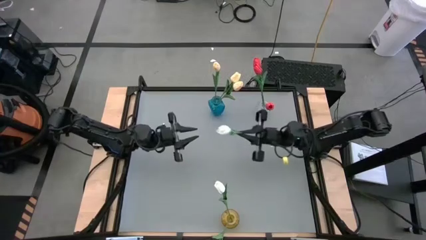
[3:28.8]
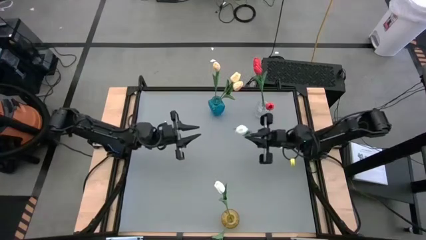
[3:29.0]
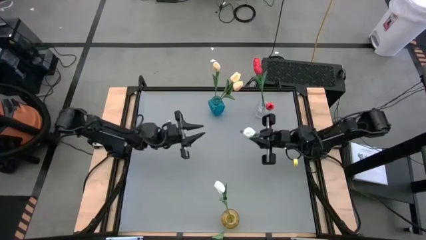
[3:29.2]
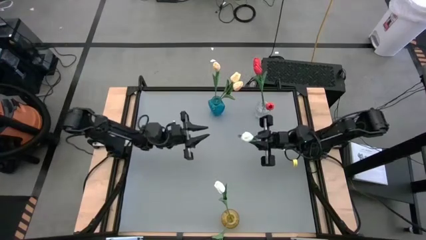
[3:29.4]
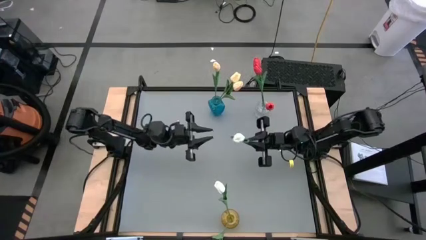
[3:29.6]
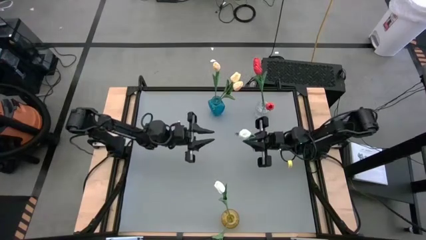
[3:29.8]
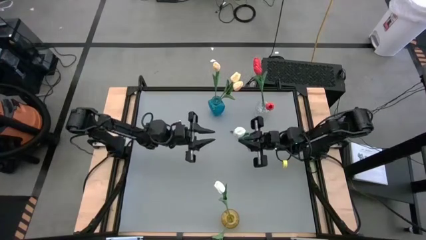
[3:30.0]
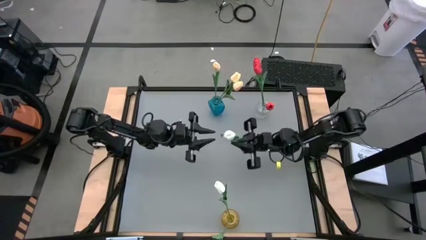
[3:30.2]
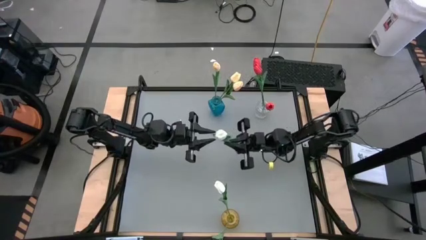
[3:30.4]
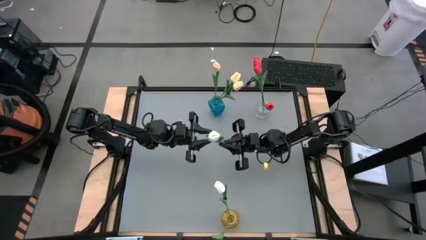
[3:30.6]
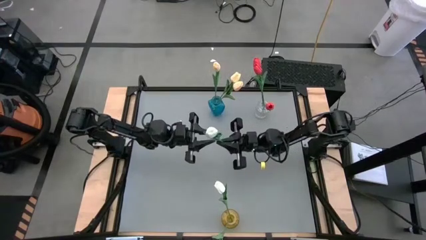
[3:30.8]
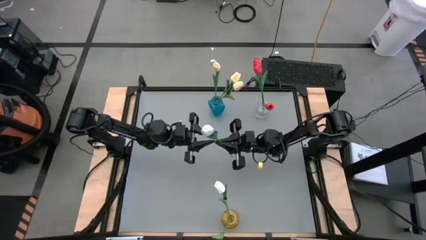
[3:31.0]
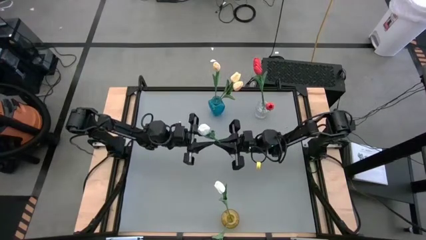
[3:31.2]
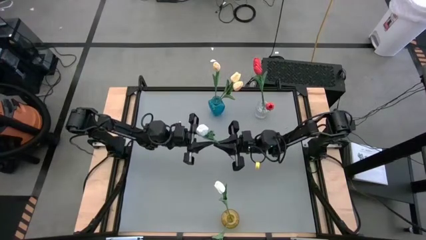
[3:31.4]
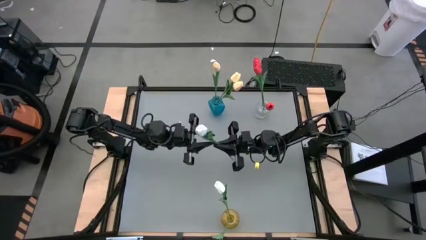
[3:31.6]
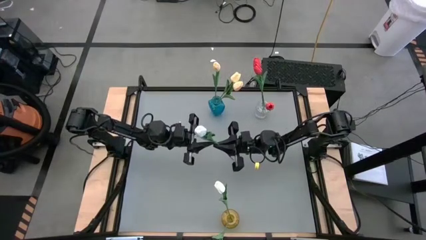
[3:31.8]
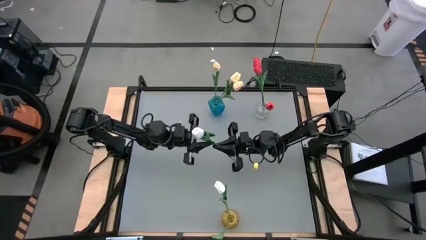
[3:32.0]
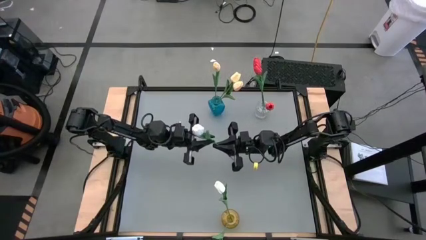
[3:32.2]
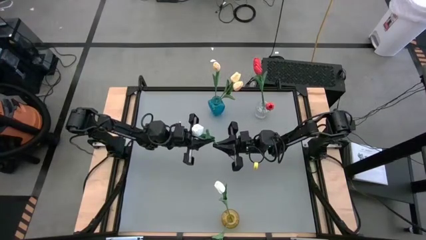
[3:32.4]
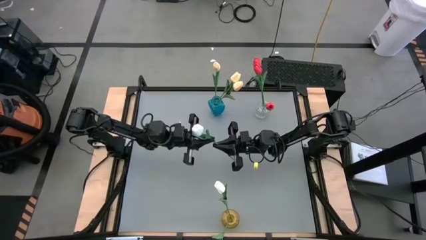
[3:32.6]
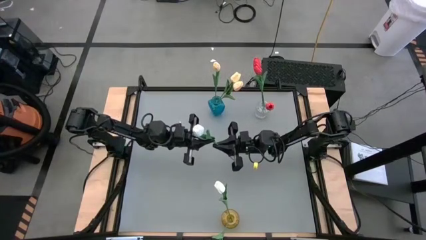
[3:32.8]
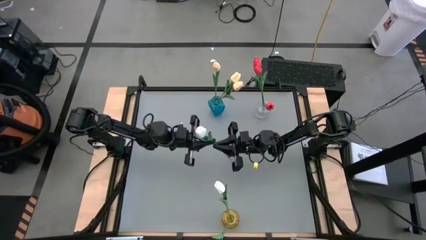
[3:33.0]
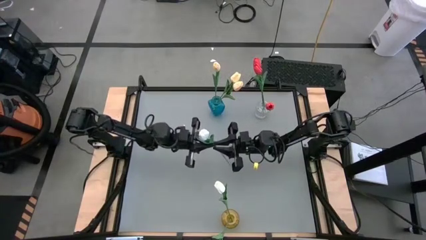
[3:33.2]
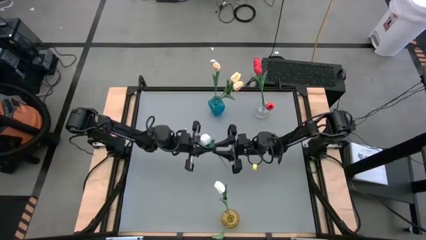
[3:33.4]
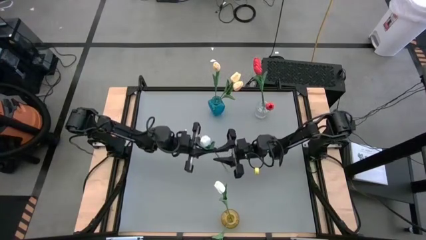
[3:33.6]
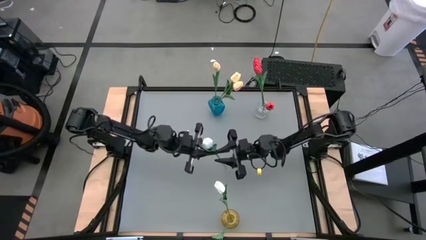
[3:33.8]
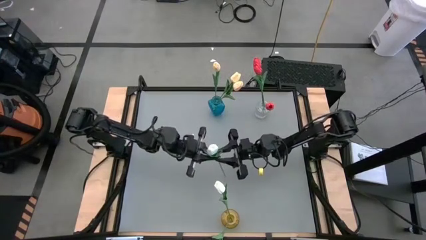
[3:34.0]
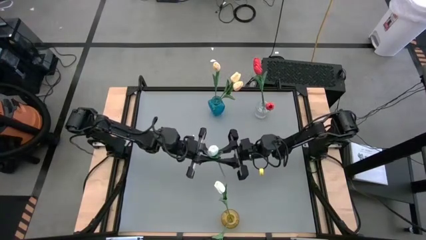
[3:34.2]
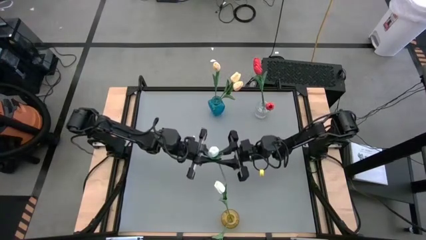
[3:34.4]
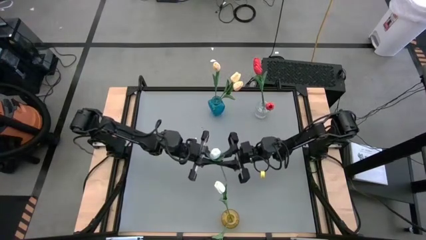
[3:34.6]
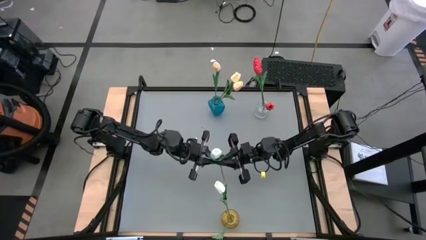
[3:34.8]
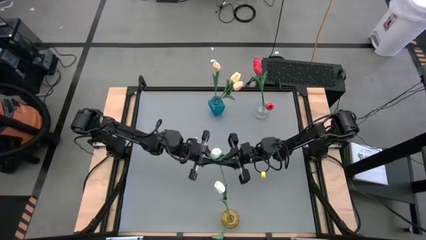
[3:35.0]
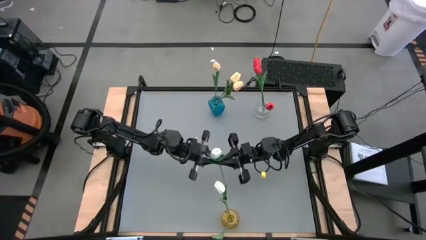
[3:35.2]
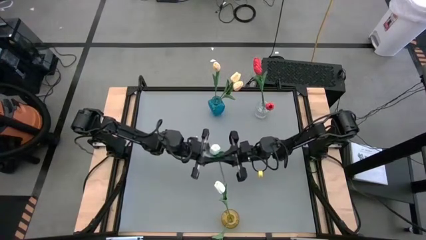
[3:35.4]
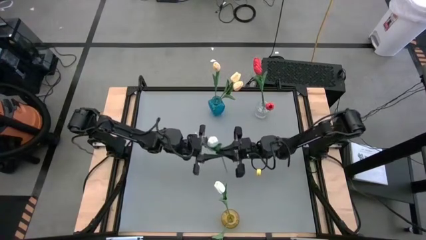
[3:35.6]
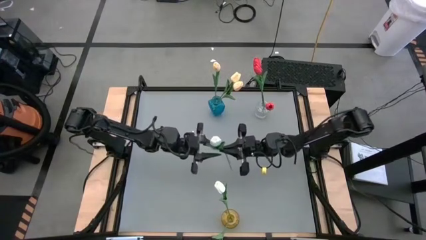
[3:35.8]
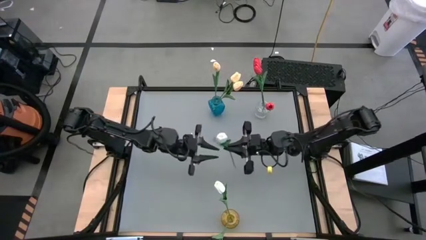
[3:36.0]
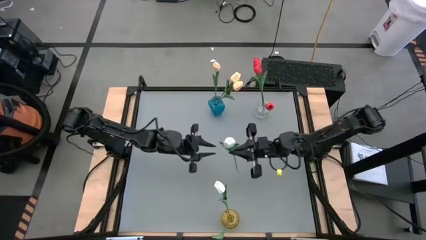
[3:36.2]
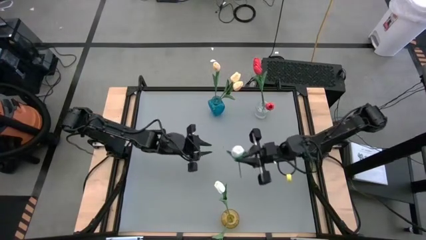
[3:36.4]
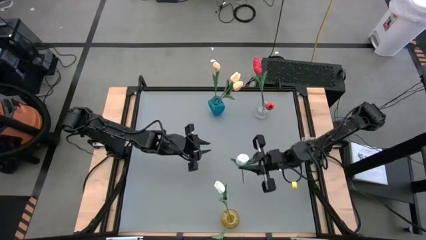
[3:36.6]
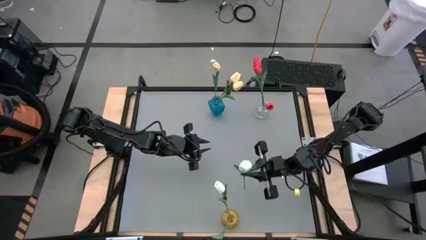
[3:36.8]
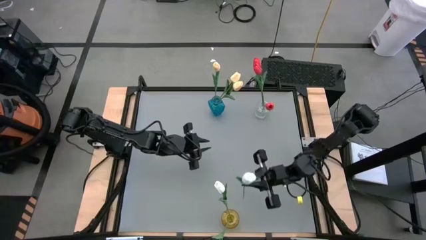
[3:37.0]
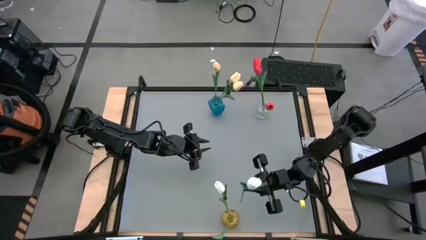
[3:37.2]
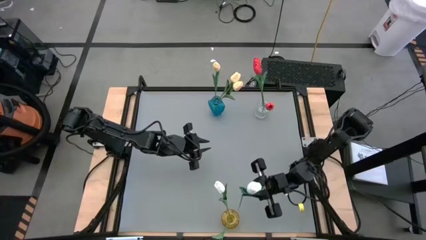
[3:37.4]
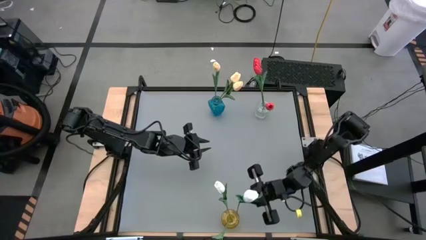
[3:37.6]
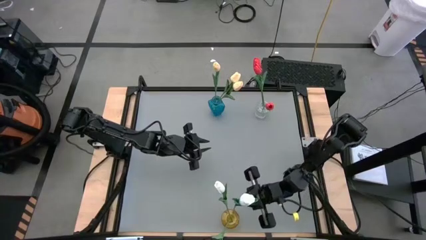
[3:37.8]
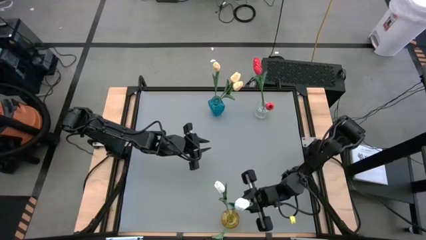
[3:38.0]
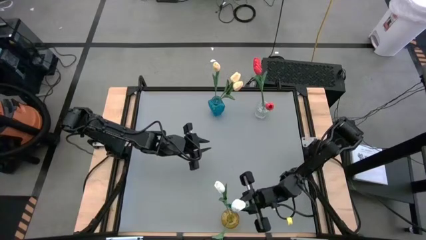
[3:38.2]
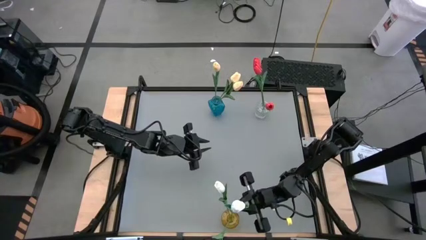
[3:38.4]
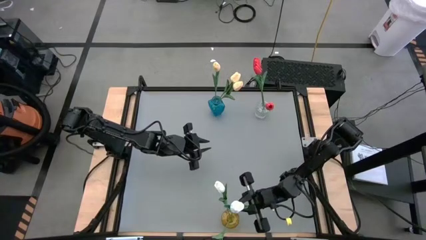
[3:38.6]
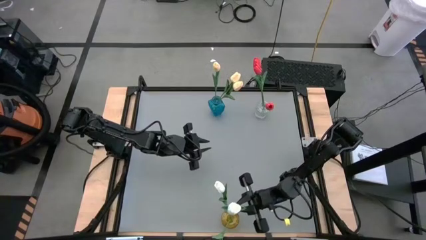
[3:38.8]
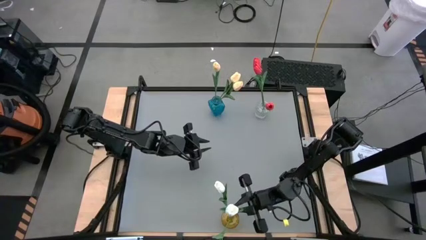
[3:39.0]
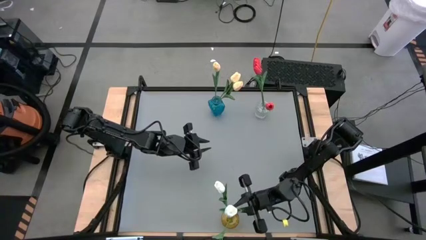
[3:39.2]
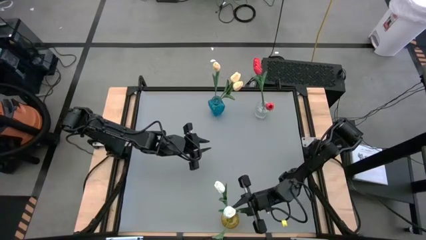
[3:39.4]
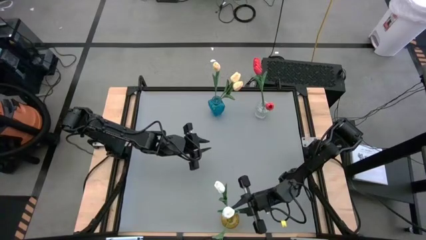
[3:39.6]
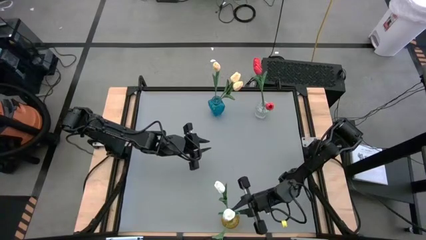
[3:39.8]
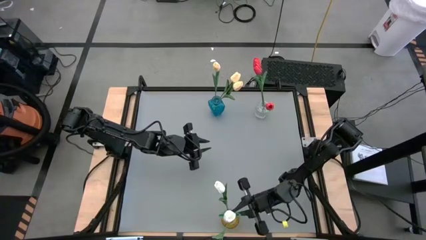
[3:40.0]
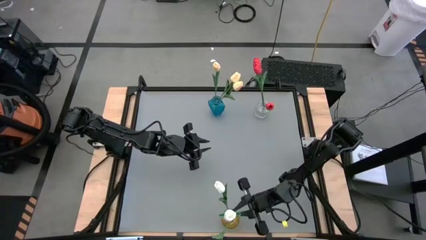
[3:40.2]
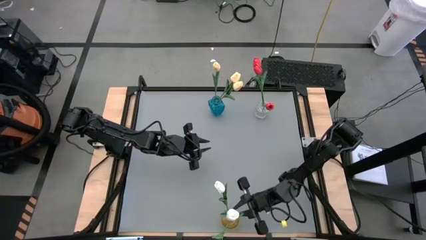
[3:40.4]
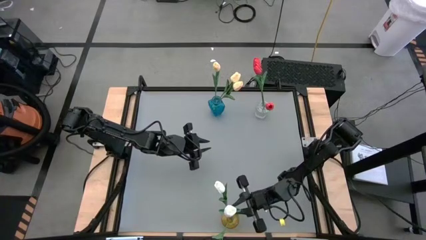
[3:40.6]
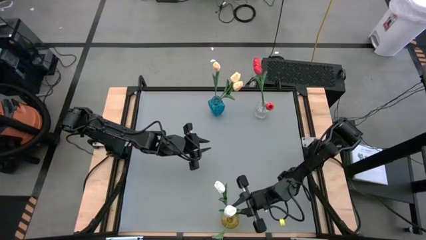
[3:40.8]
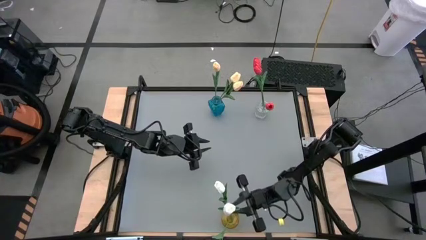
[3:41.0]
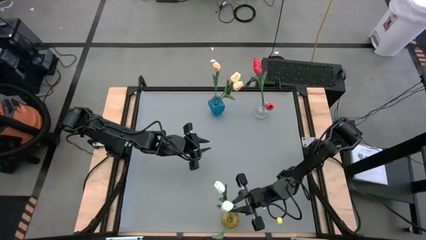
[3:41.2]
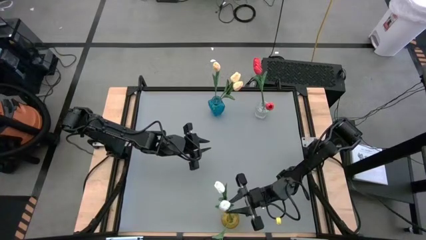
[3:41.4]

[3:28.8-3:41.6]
Task: Sort flowers into vase by color
Put the white flower into the yellow vase
